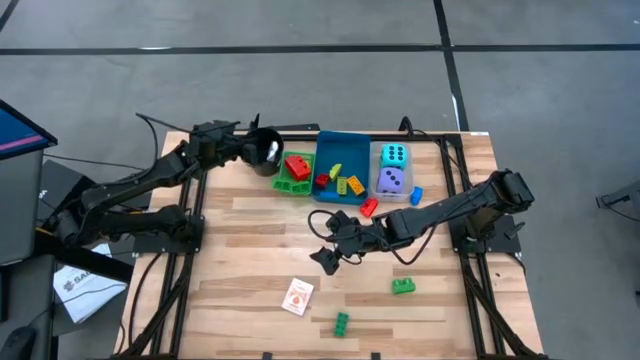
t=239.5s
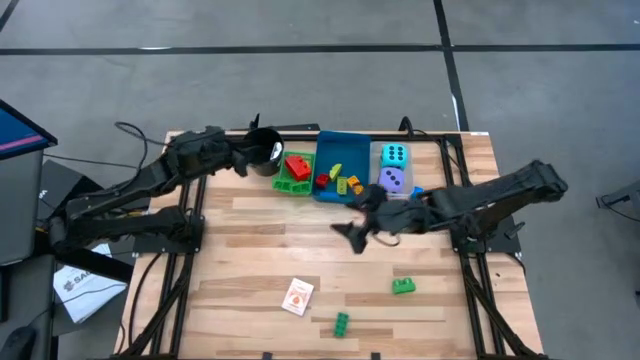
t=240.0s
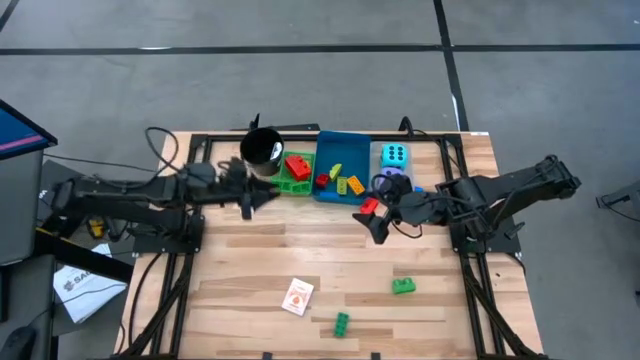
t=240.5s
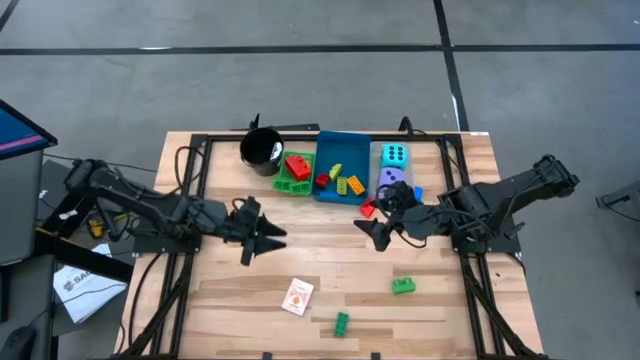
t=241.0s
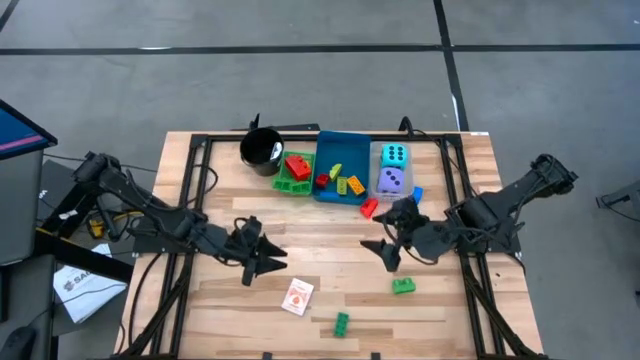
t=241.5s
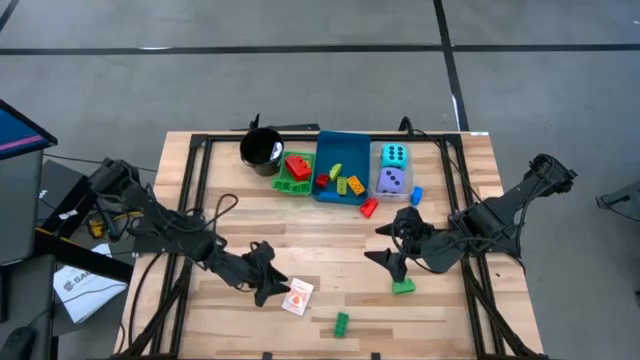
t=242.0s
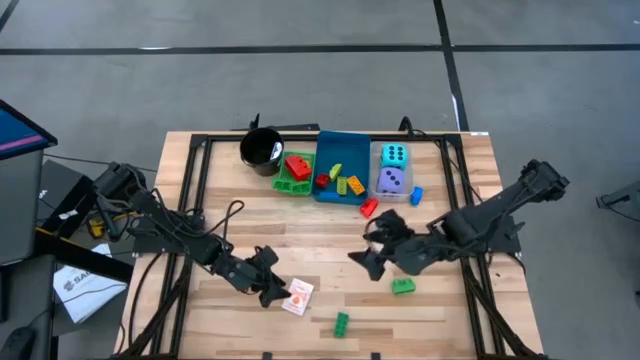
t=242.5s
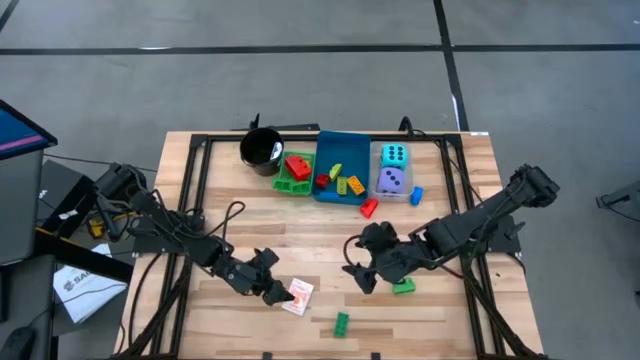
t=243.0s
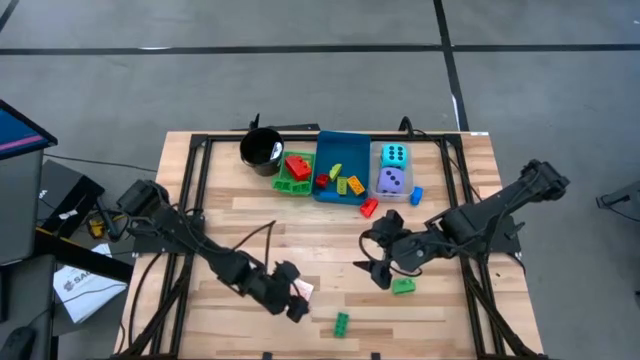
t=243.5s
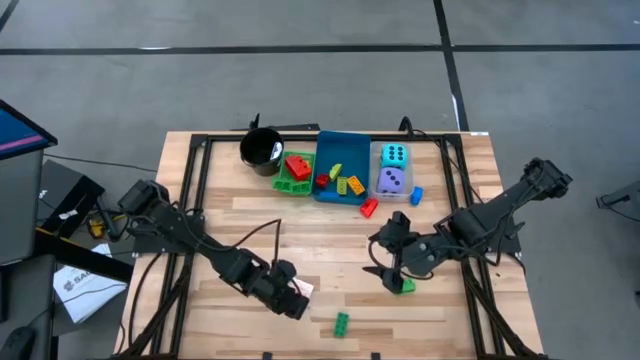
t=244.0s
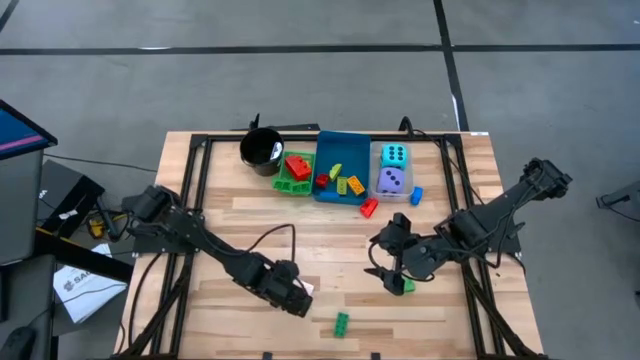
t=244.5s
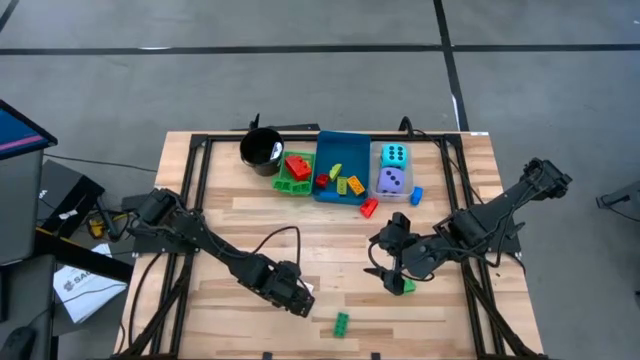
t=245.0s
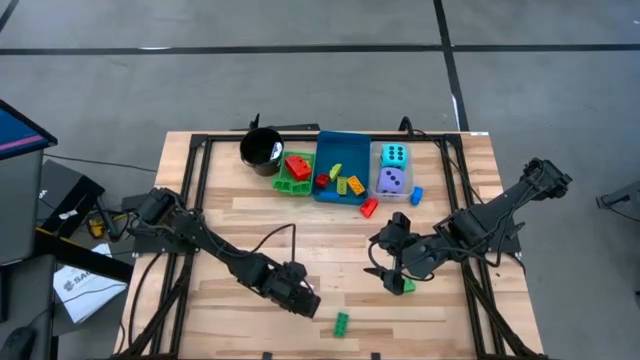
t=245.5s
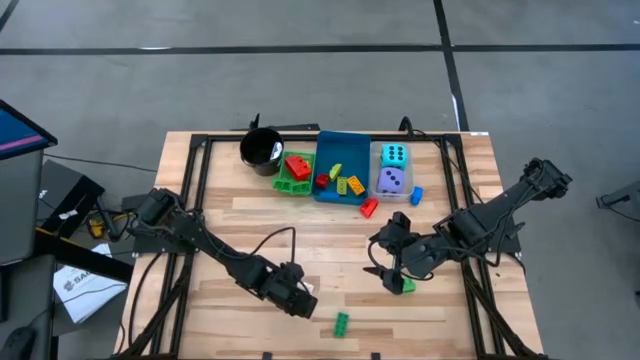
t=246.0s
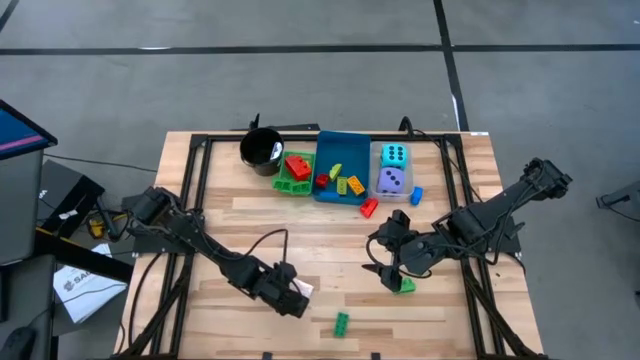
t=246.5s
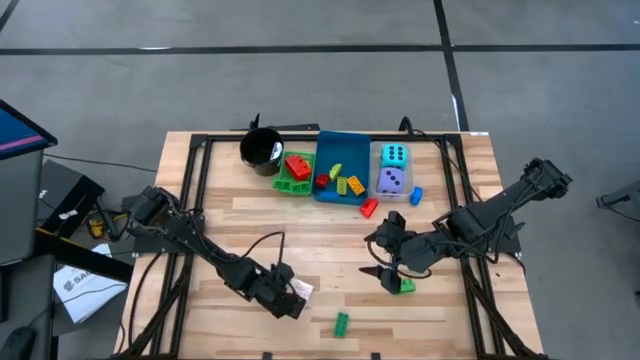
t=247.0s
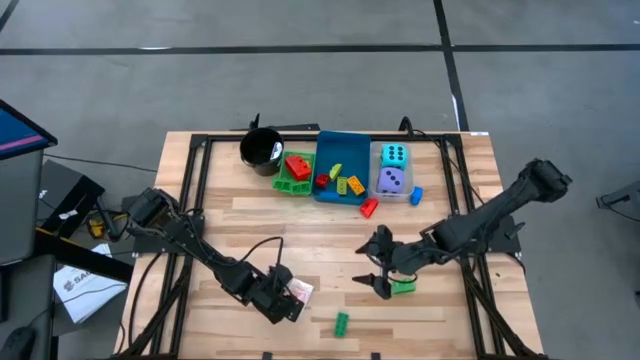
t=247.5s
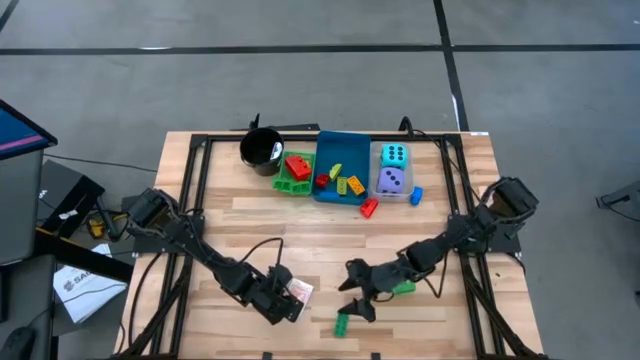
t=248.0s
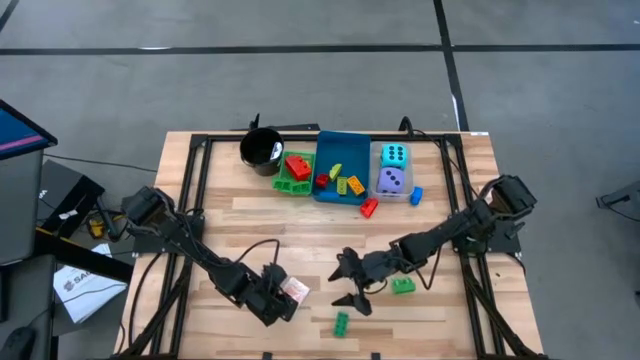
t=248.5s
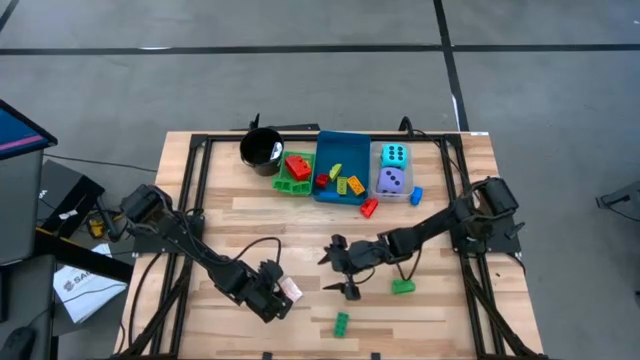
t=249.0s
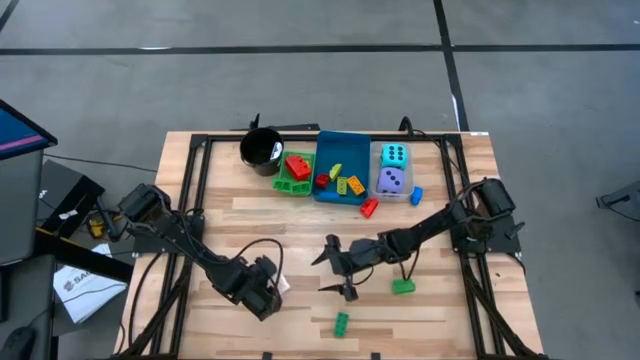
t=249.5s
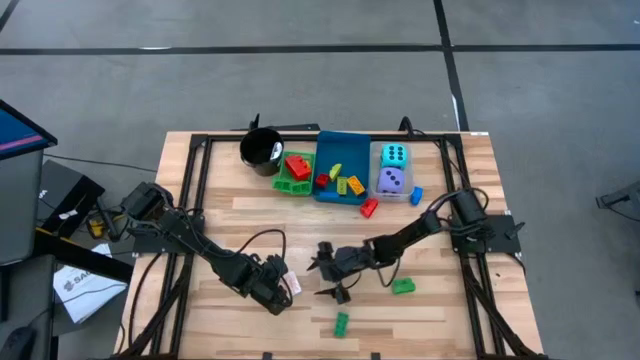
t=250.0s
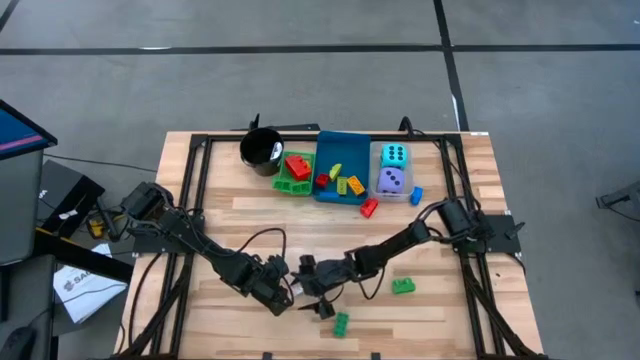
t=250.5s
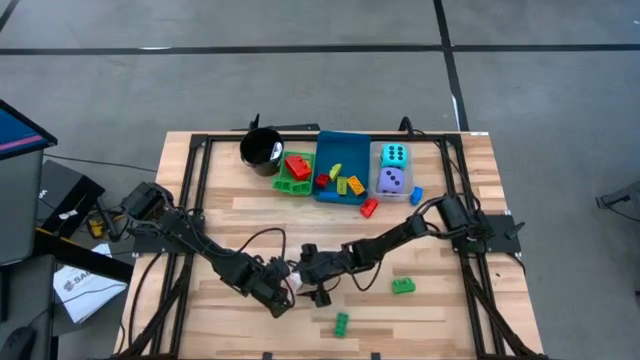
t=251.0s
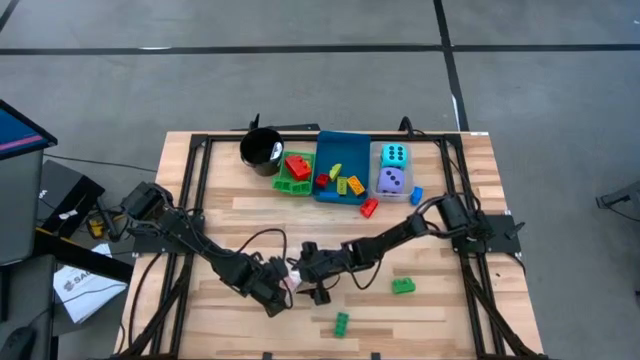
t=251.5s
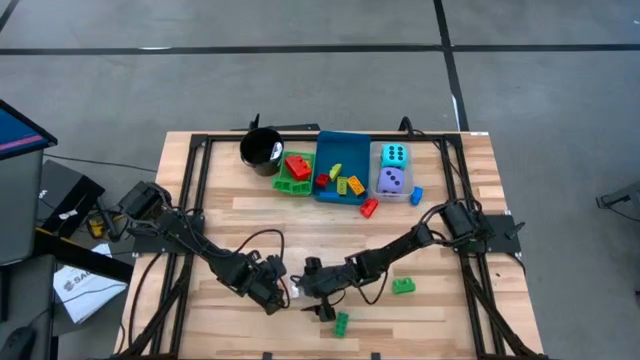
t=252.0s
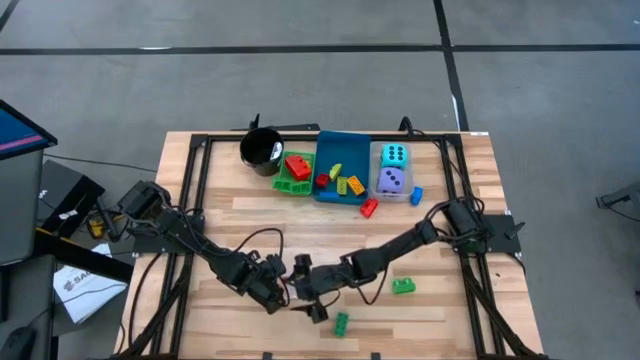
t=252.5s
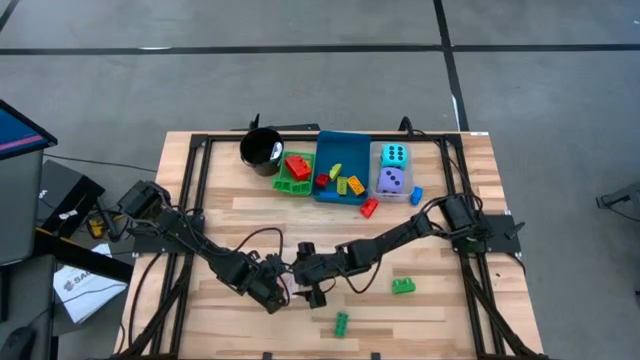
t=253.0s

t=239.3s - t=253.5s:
Task: Pick & Place Toys
Put the orange deck of cards into the black bucket
